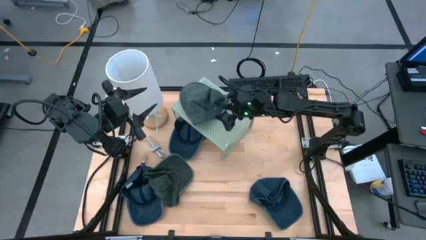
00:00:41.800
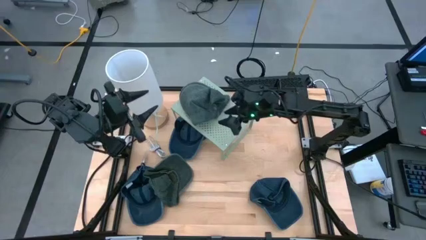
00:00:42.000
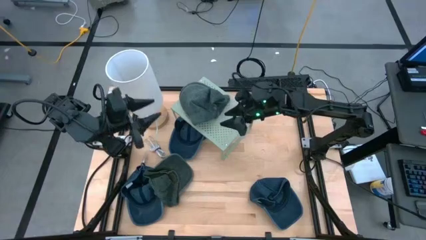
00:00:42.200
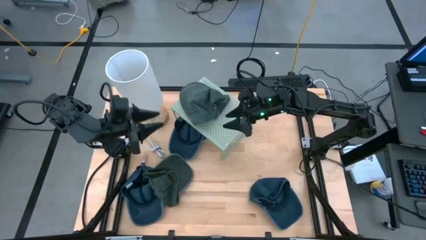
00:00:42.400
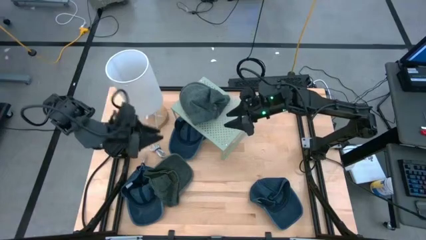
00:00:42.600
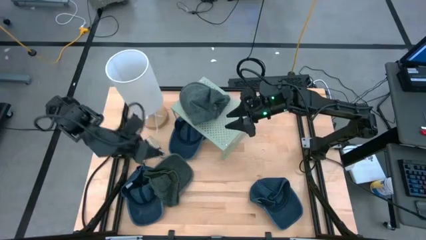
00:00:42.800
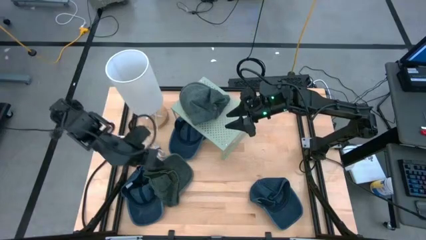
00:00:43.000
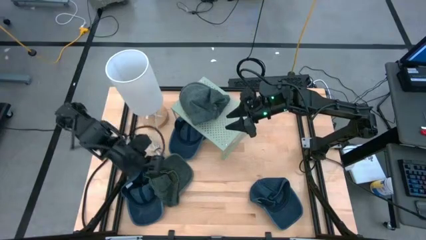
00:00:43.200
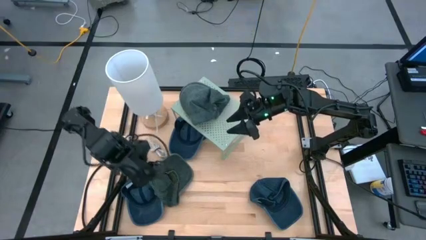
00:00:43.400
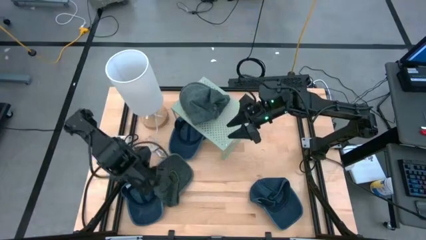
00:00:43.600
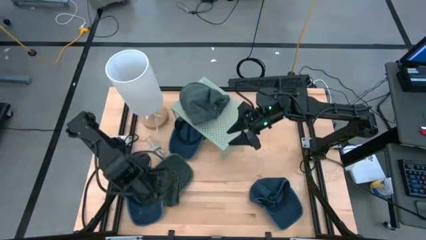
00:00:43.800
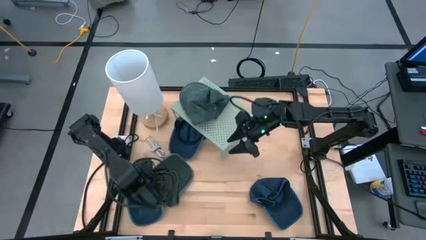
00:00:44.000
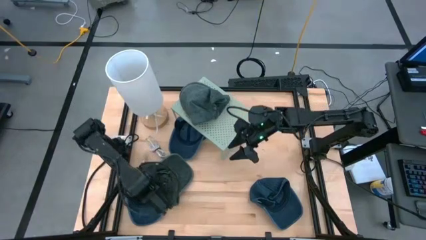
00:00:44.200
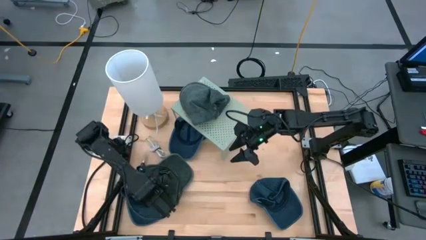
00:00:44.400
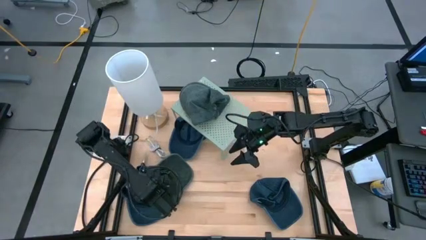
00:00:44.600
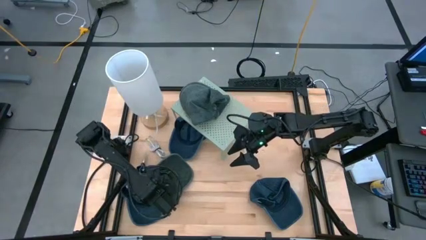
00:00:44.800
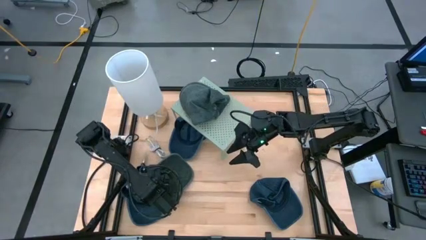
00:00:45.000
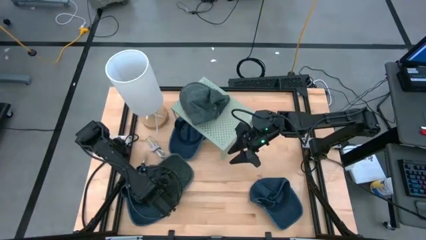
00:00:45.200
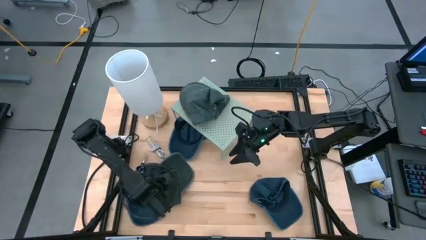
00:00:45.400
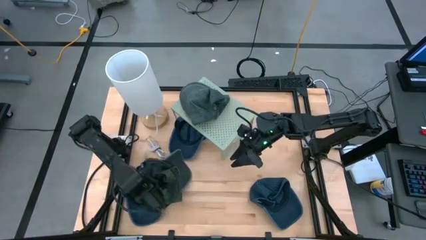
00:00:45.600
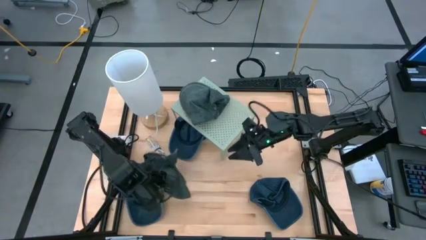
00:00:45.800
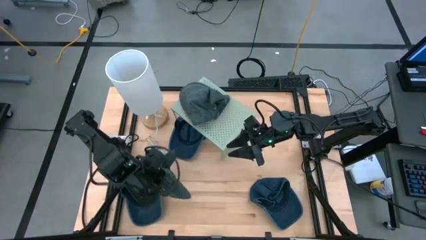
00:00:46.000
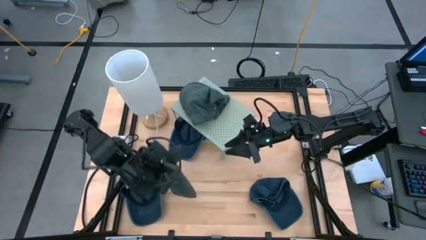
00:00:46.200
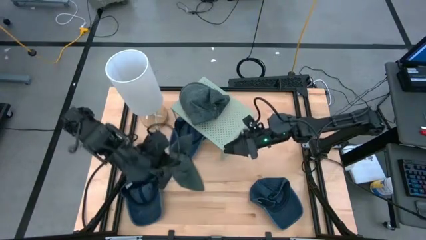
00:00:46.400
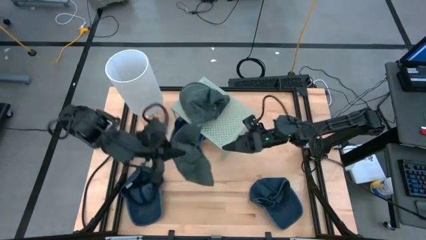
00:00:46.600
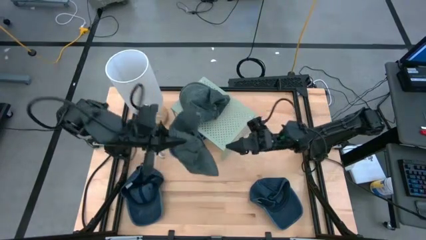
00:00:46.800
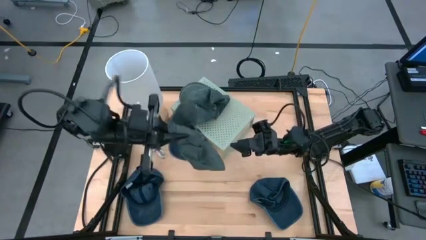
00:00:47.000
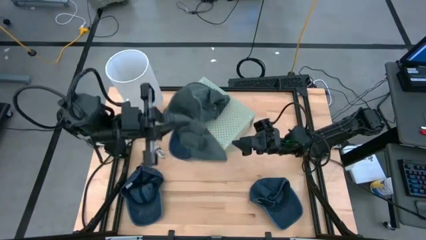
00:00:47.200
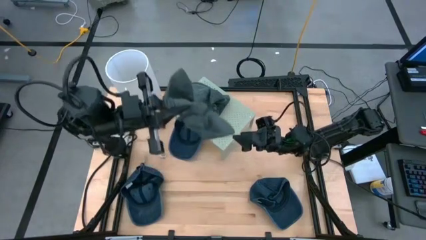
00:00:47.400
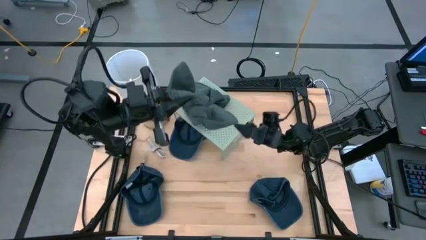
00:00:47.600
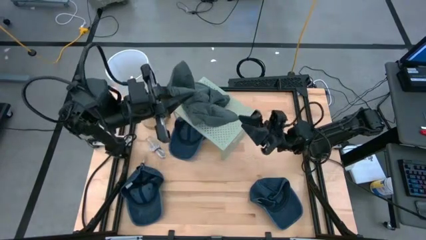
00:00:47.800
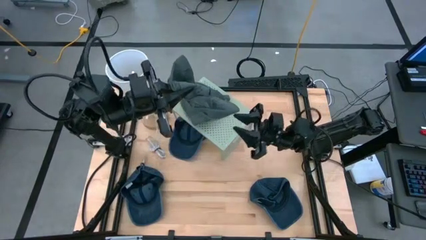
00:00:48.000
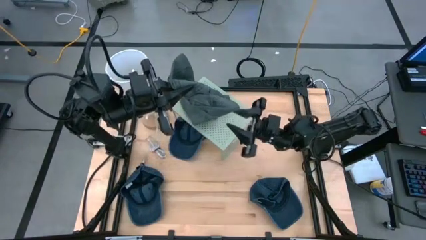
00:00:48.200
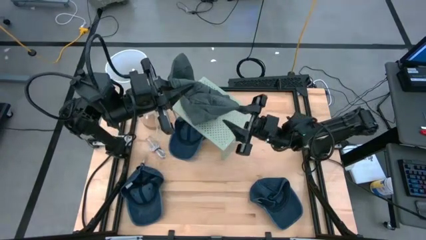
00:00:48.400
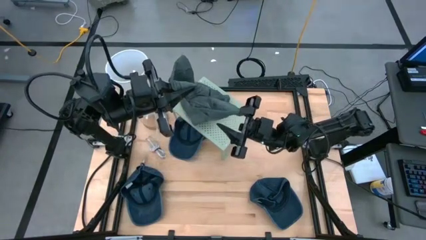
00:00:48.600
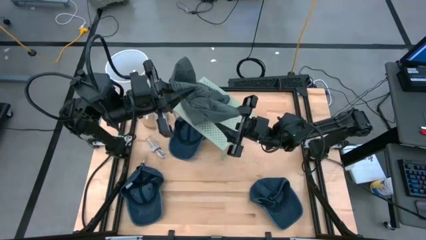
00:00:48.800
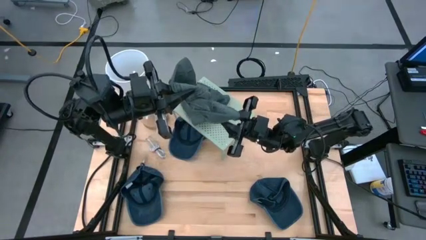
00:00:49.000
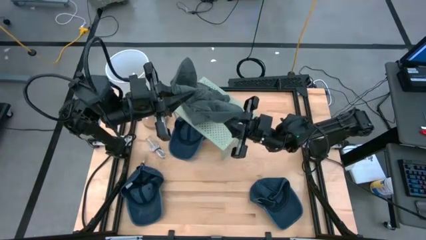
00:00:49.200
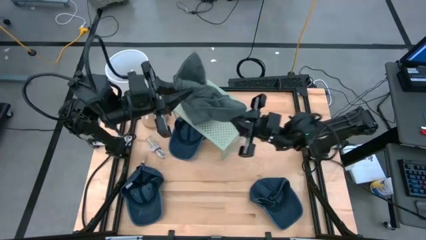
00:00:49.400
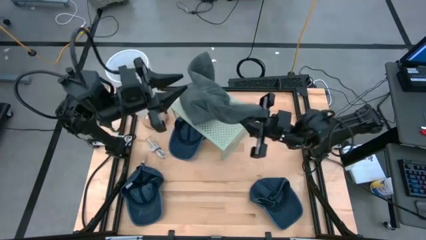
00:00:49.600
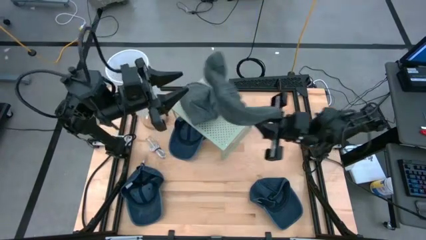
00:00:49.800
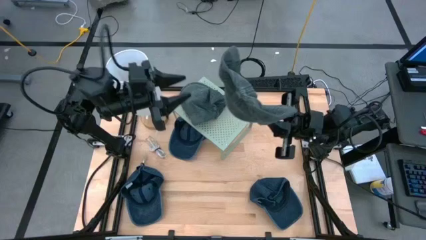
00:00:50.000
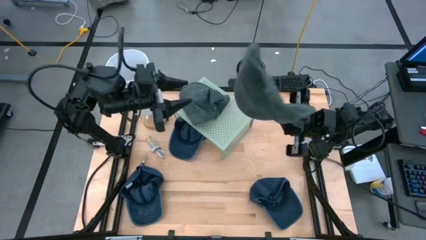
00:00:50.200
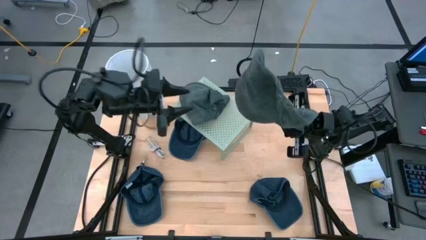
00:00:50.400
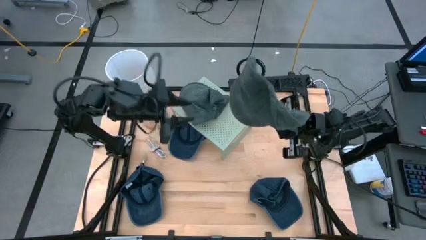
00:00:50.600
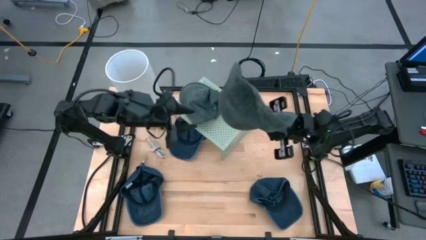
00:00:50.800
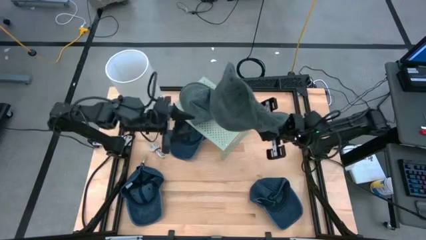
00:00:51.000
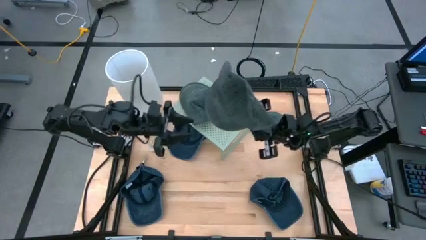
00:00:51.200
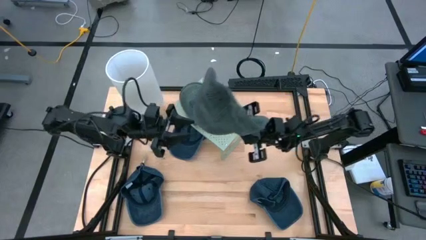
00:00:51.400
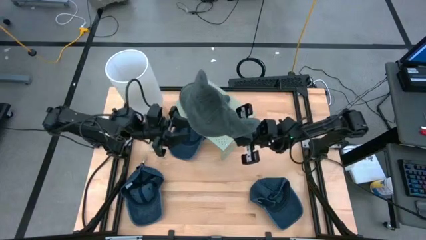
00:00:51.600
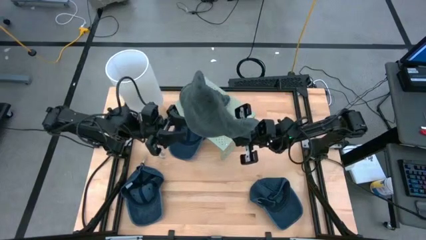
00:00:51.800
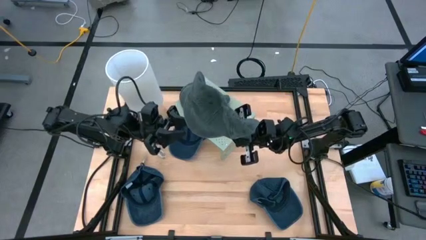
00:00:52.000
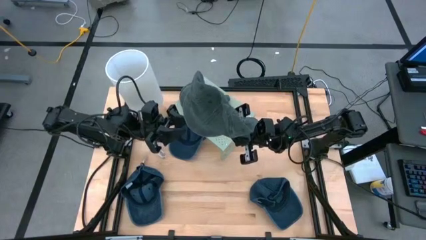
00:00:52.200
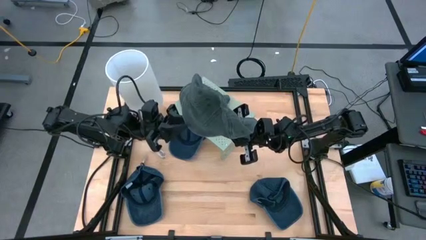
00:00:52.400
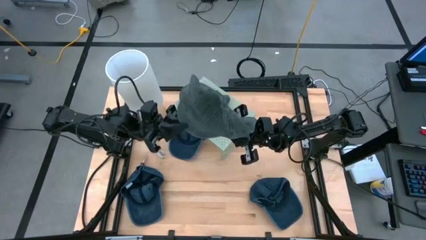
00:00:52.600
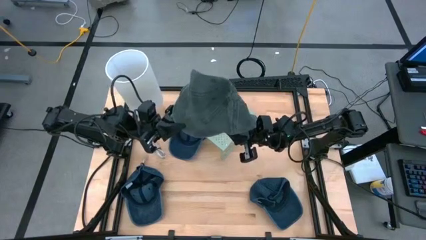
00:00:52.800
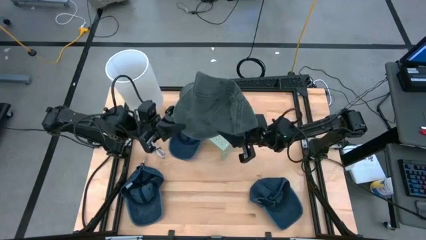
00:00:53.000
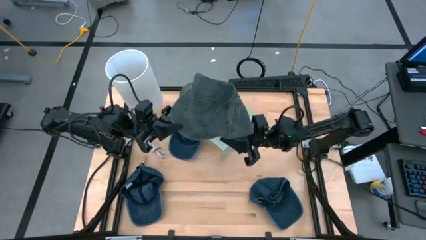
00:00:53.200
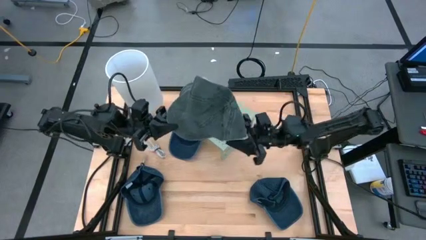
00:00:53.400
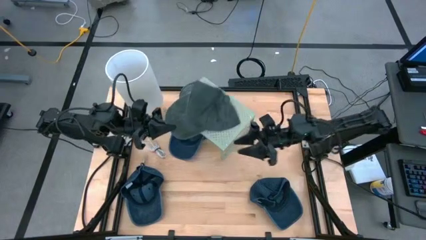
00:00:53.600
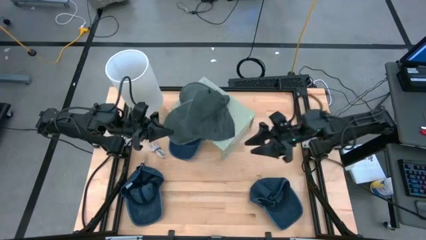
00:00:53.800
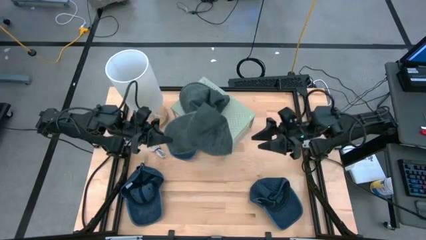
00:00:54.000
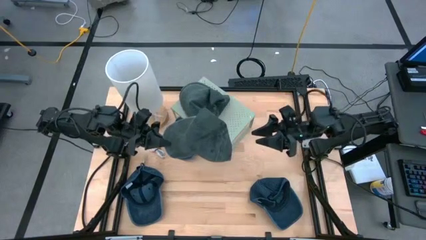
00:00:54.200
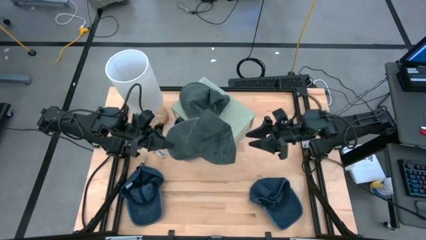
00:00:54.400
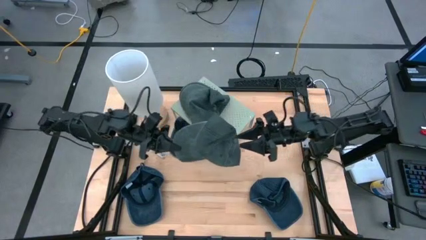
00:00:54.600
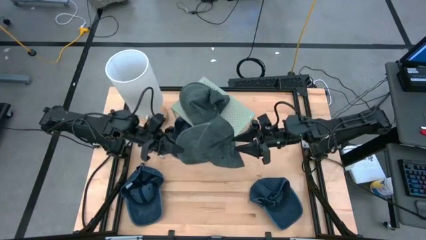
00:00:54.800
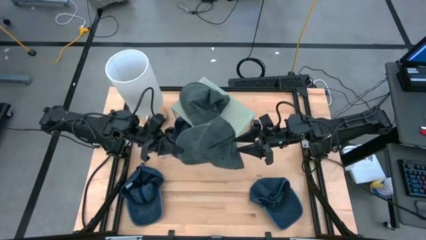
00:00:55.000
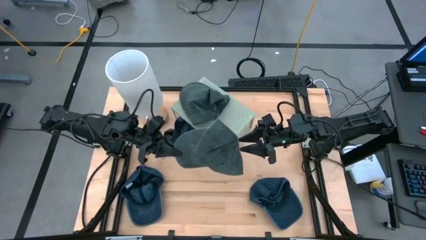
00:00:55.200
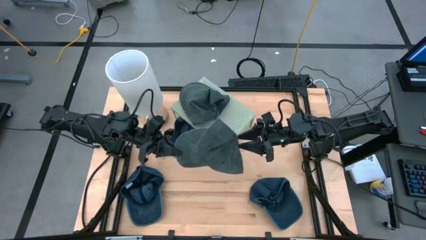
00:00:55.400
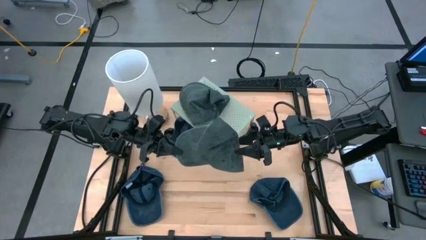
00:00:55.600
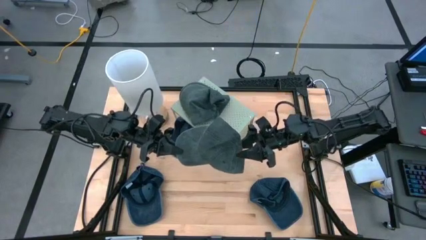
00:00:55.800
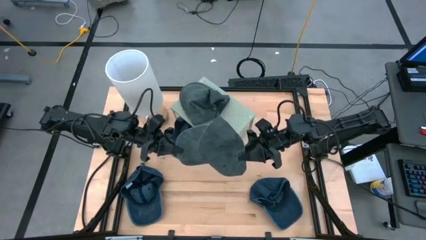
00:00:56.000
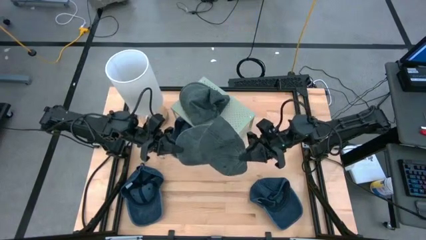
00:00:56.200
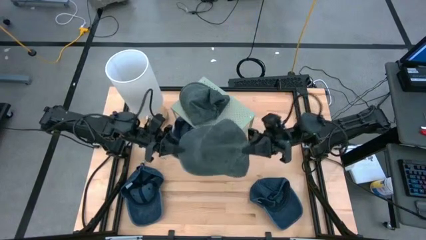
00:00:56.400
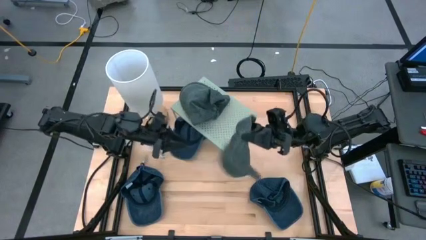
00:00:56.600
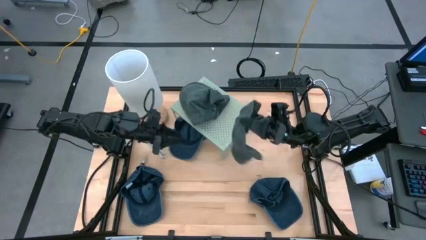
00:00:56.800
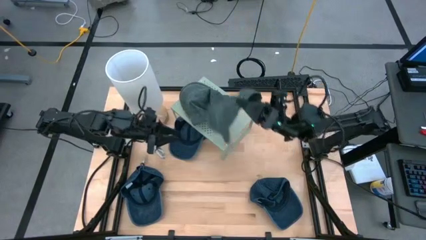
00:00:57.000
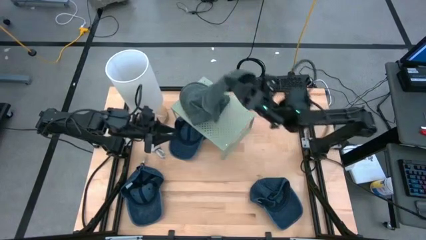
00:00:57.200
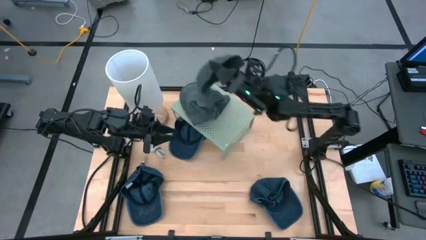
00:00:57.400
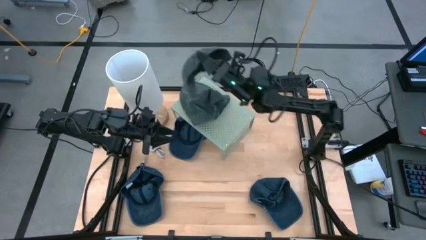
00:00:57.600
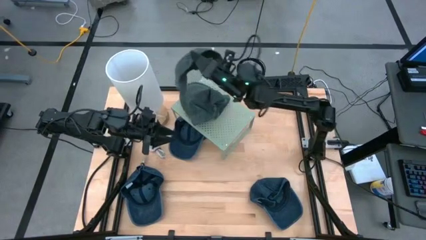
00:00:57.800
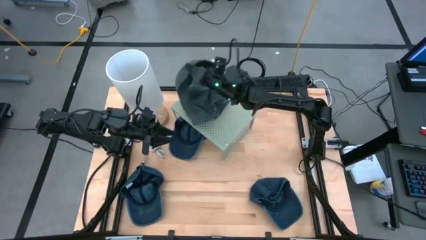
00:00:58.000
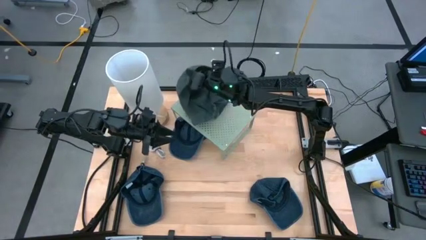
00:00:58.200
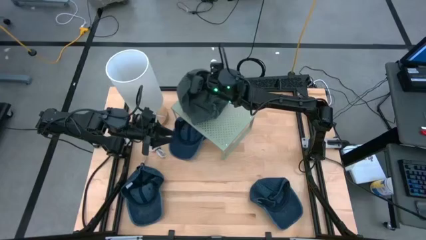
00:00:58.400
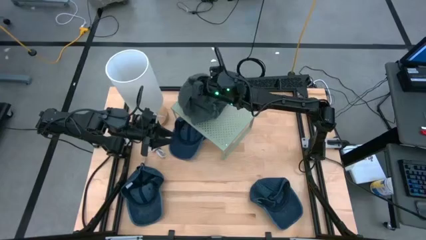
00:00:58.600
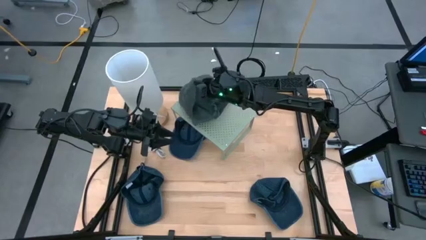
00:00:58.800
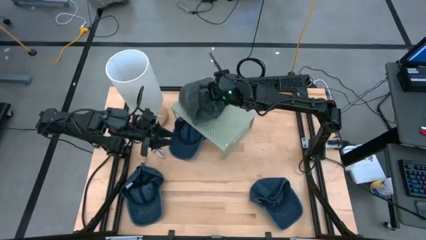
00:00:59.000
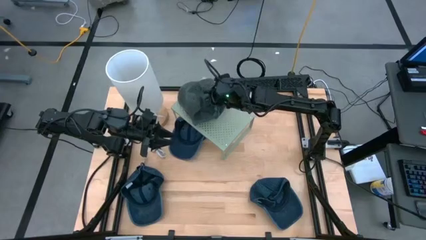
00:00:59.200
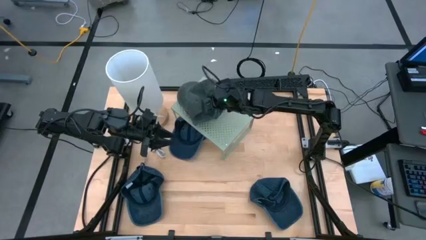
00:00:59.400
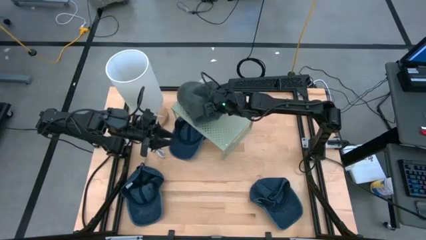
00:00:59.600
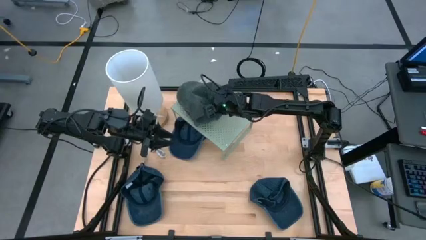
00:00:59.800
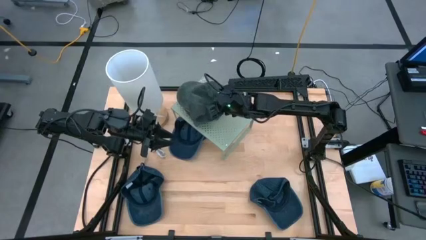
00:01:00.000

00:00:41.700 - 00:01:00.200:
Task: Pick & Place hat
Stack the black cap on top of the stacked black caps on the shelf
